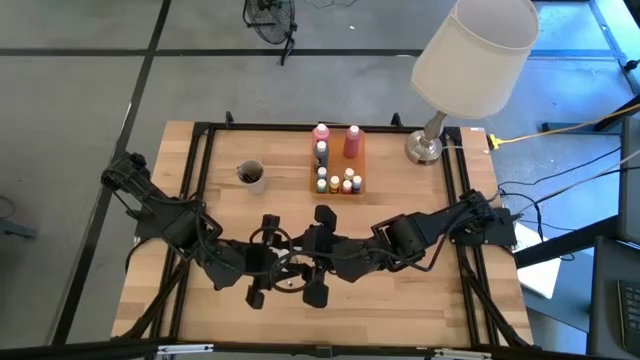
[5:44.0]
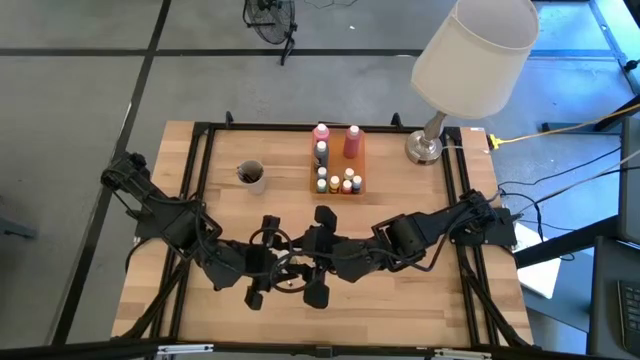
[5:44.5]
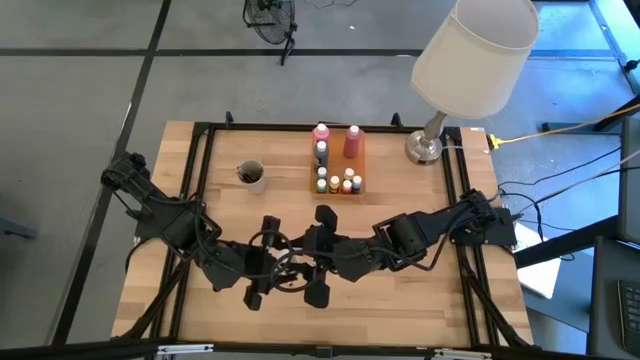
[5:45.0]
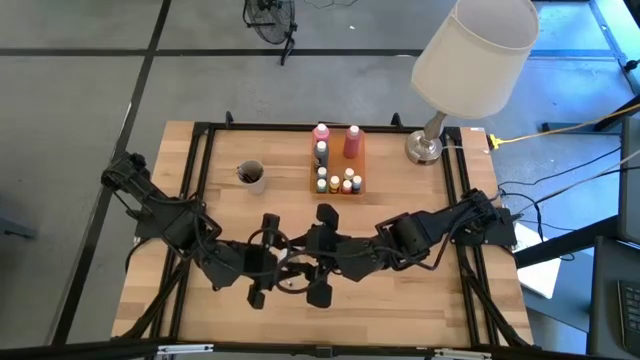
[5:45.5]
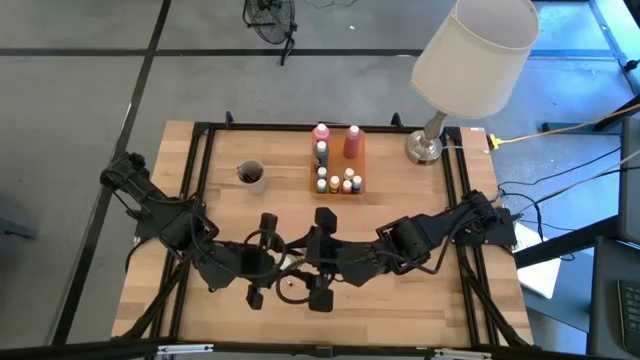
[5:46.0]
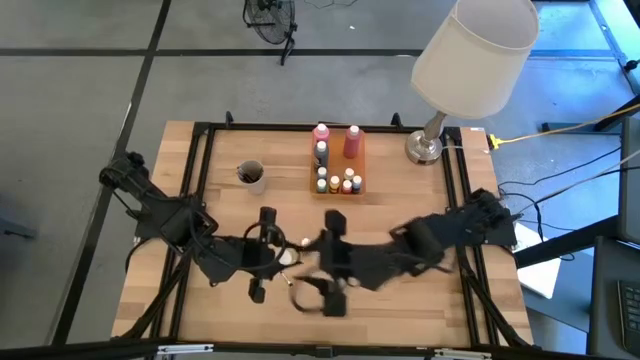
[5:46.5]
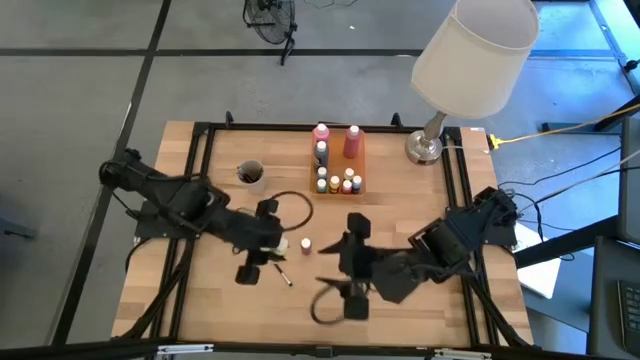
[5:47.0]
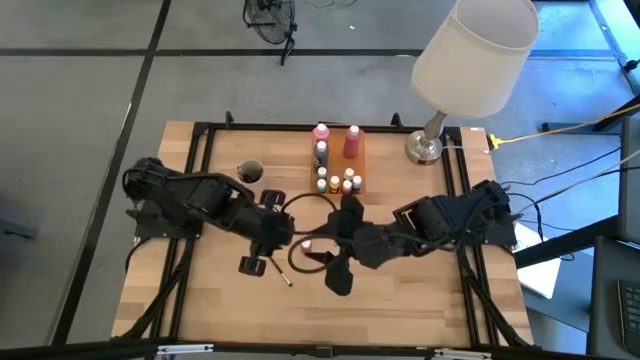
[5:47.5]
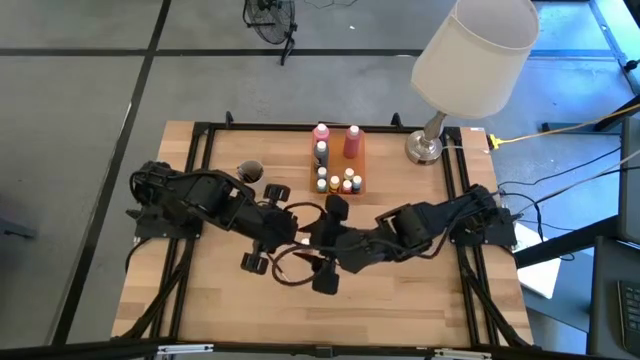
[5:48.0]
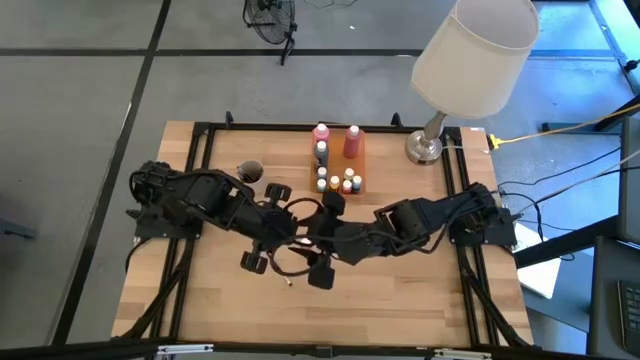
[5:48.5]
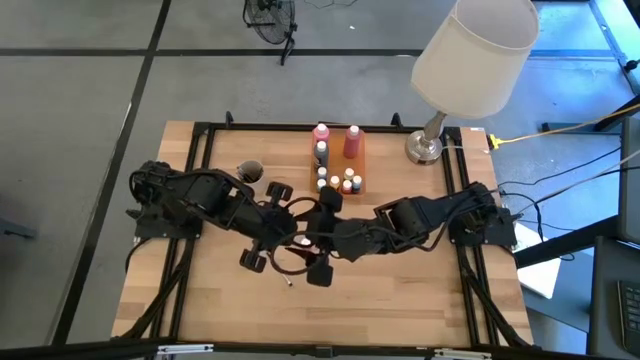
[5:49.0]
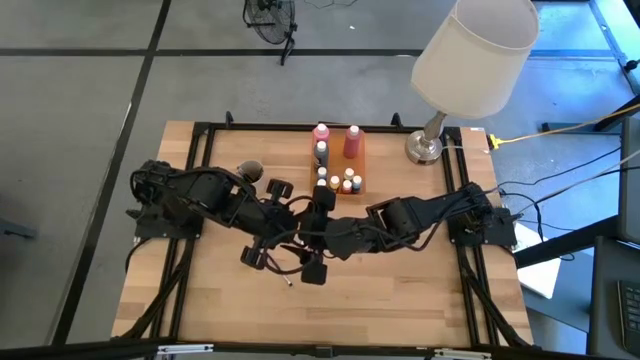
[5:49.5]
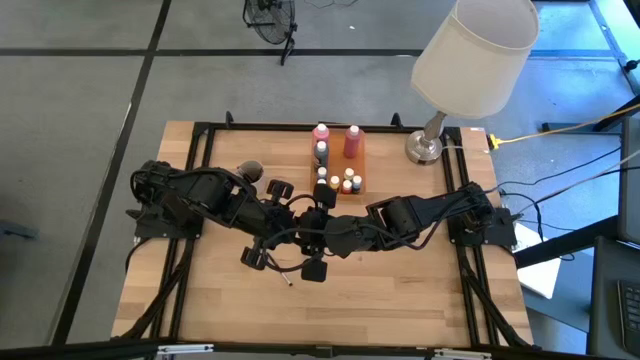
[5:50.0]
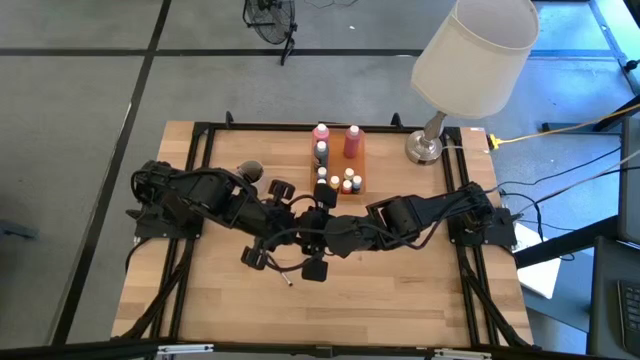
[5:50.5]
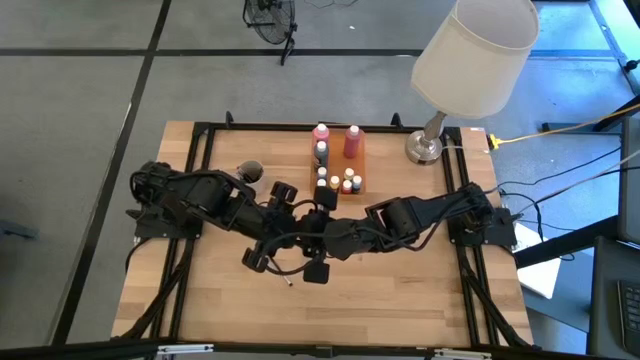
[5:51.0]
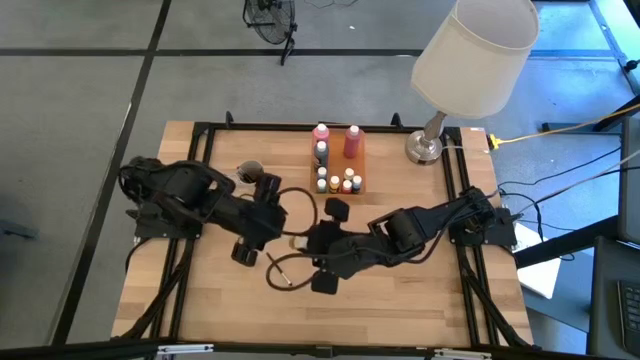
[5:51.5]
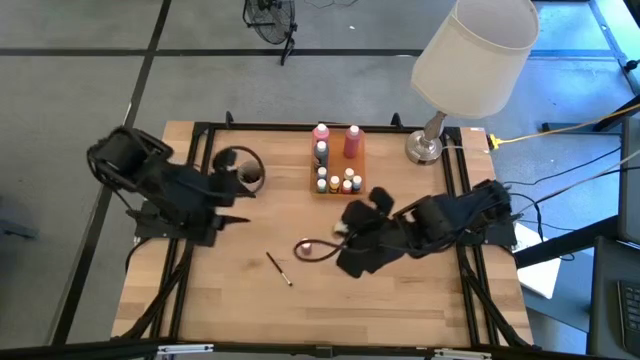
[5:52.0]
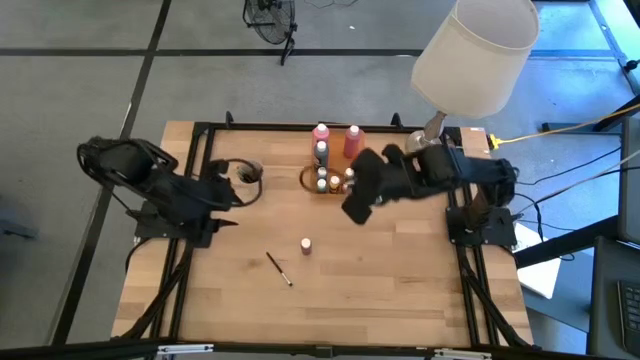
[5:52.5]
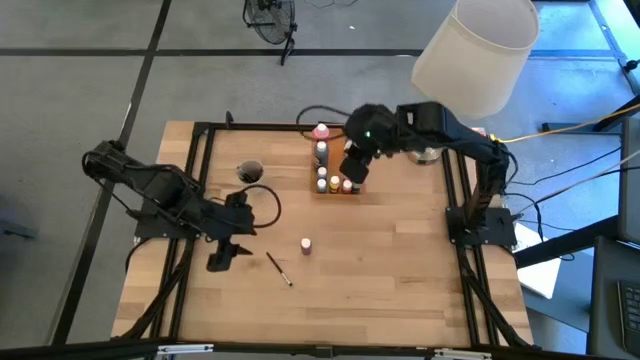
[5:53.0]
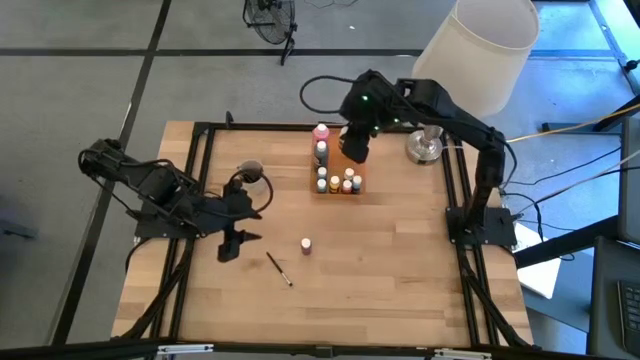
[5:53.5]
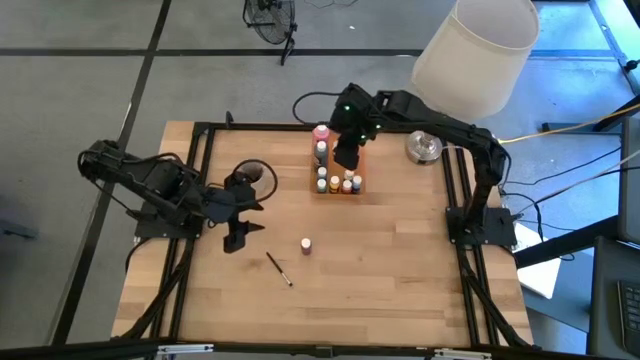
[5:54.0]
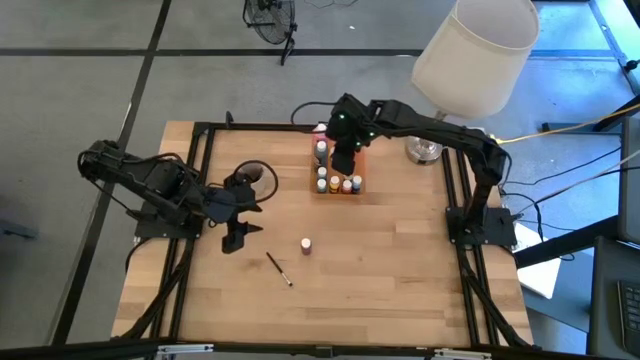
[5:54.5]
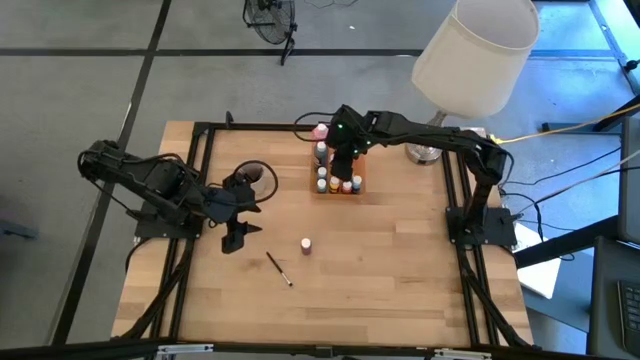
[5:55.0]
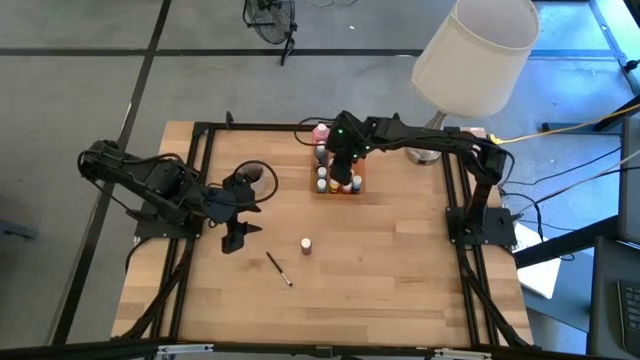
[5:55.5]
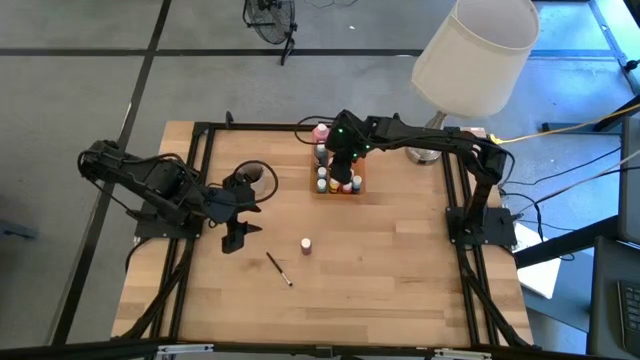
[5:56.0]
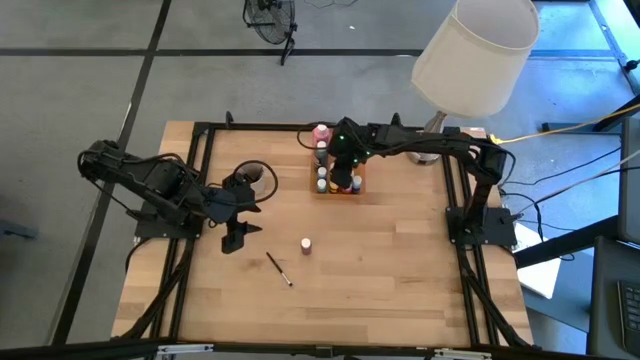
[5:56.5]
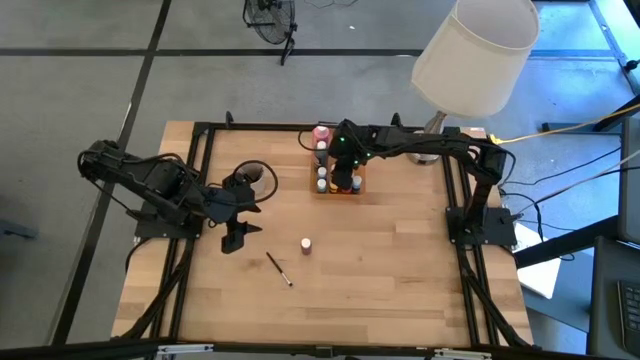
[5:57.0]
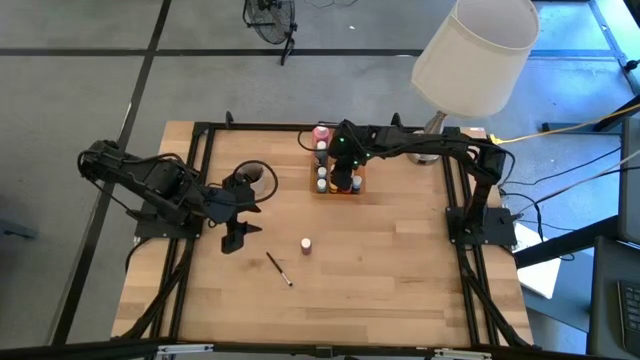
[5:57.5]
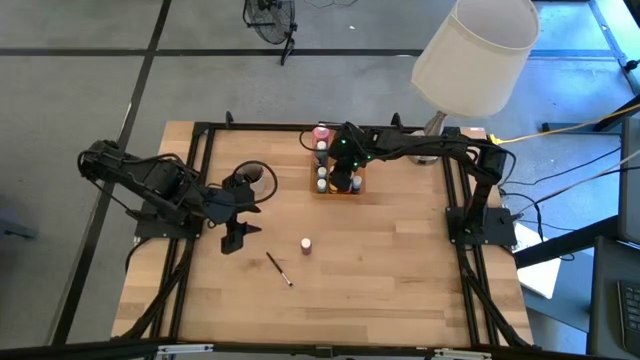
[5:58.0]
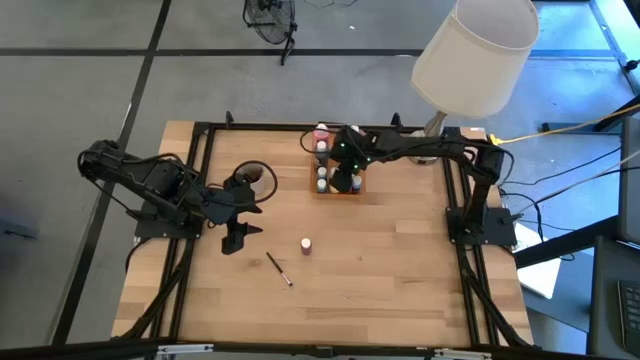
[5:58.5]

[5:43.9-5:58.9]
Task: Pick & Place Paint Supplies
Put the small light yellow paint bottle into the orange bin

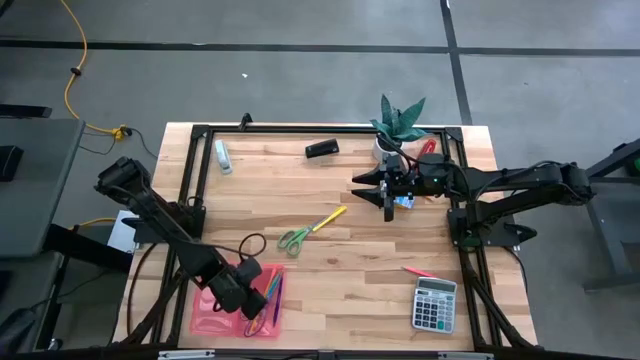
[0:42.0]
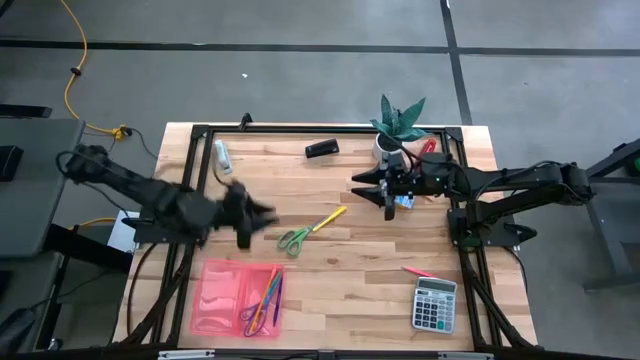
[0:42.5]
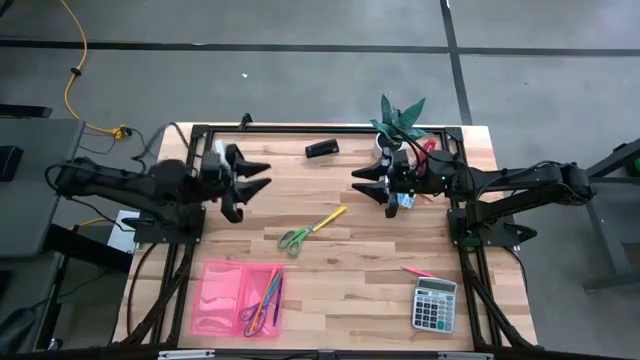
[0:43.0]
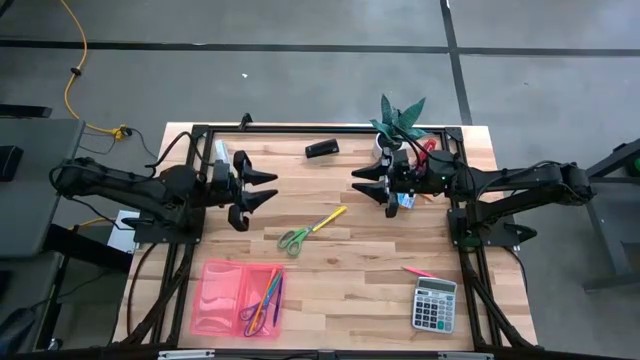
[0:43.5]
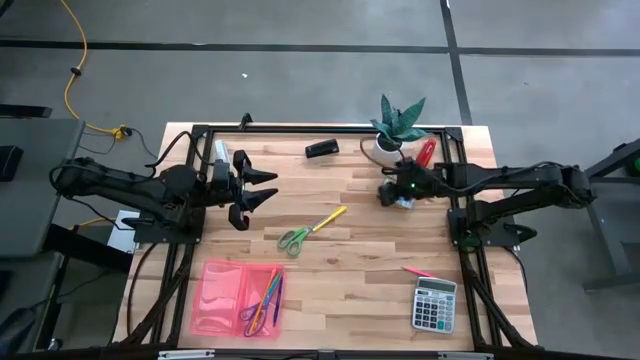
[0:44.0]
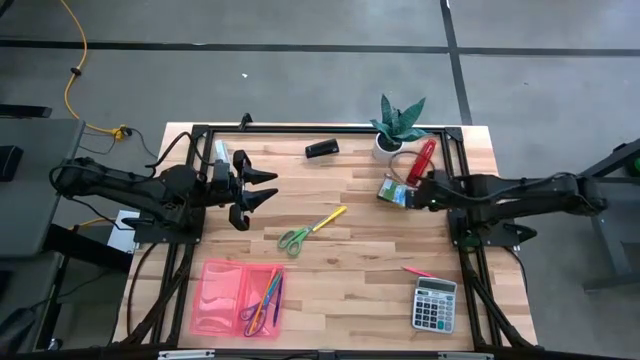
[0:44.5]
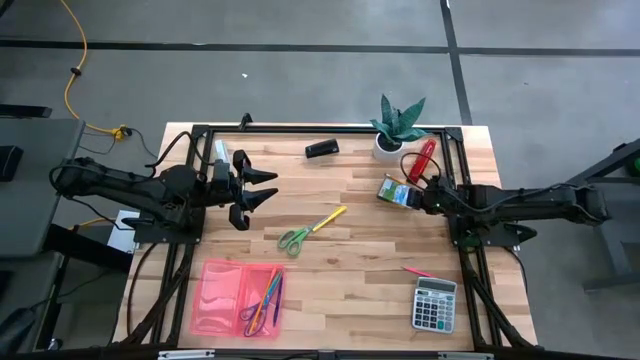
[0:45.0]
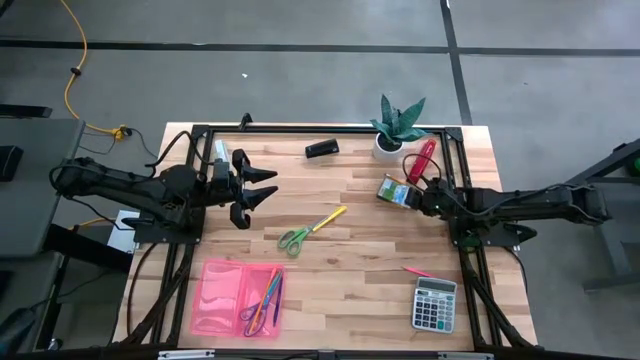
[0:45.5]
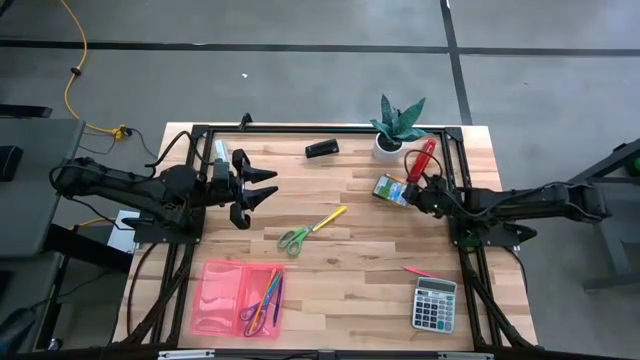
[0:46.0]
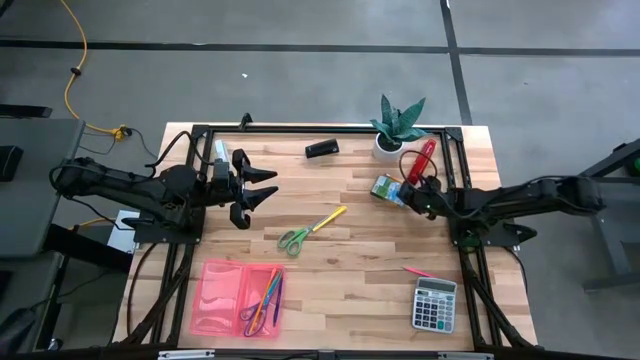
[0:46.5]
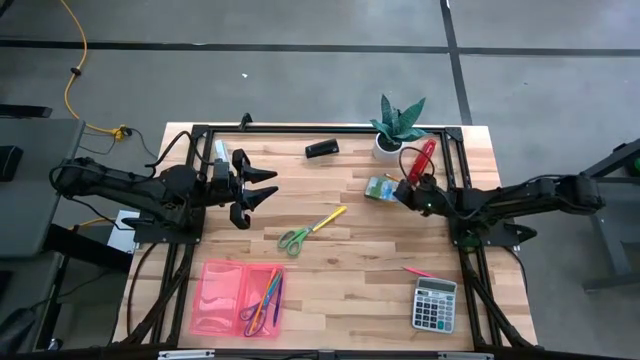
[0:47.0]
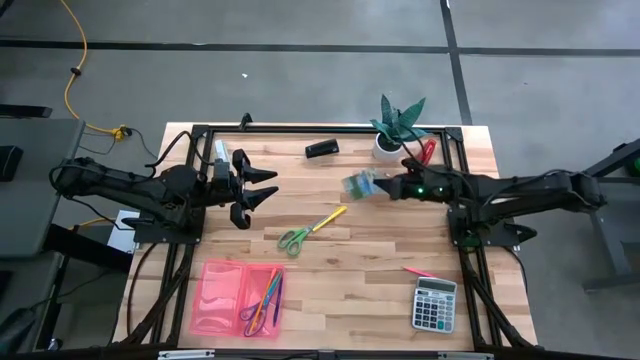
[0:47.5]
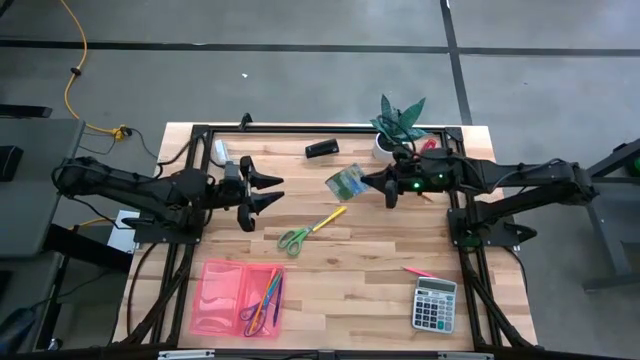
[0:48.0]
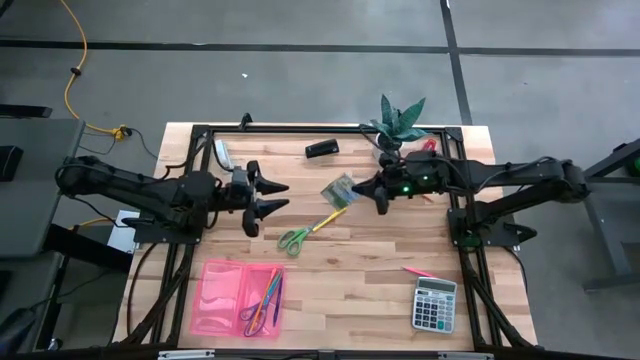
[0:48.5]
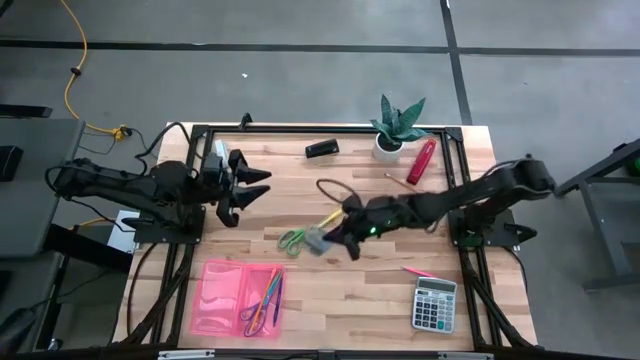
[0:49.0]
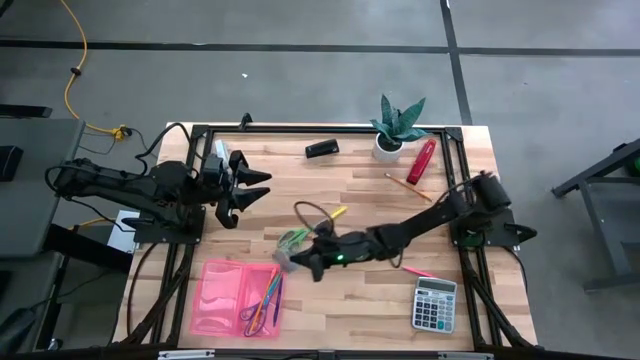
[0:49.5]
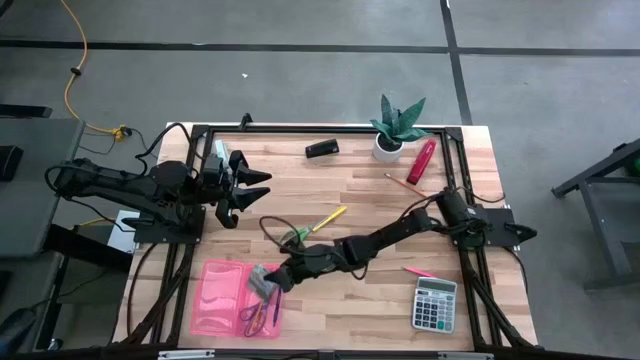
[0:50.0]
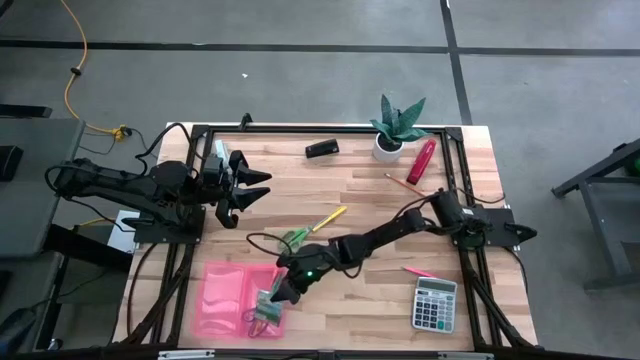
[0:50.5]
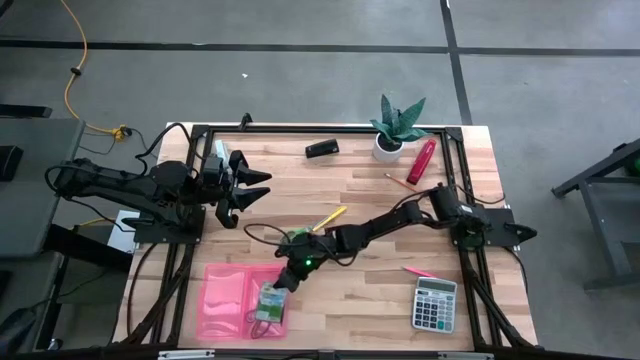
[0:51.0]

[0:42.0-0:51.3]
Task: Pack school essentials
Put the crayon box into the supply box
